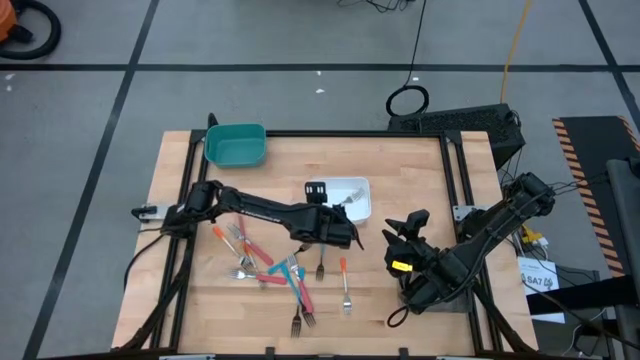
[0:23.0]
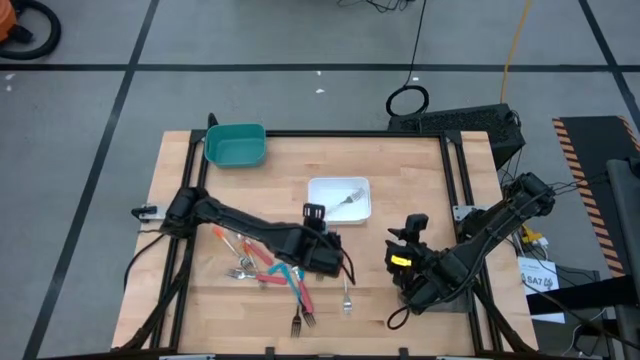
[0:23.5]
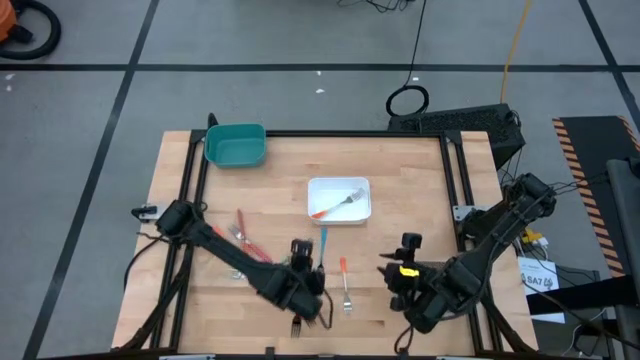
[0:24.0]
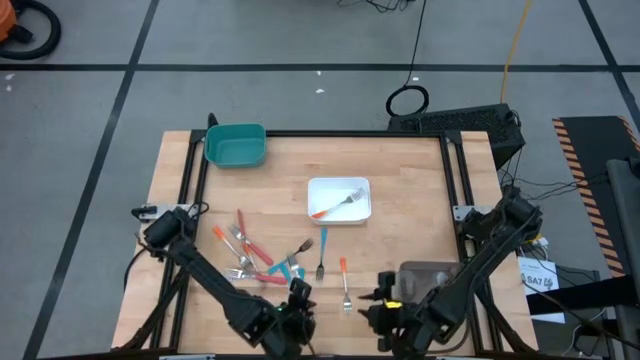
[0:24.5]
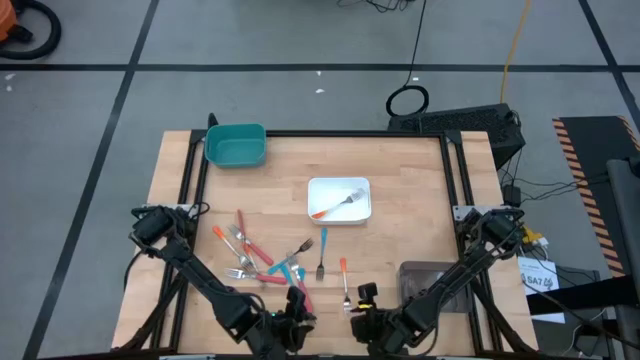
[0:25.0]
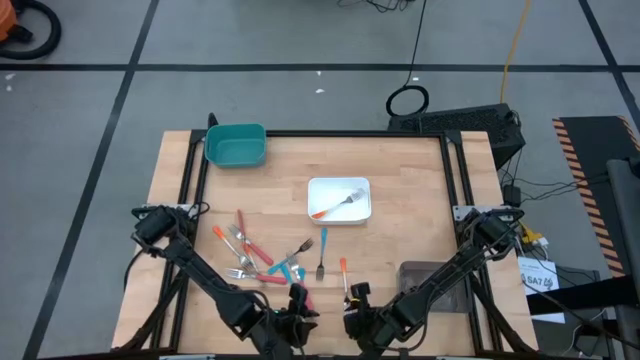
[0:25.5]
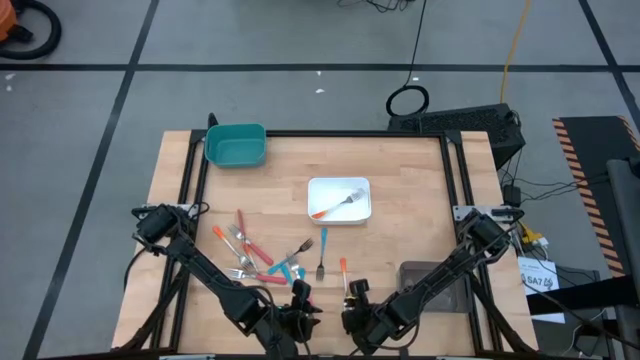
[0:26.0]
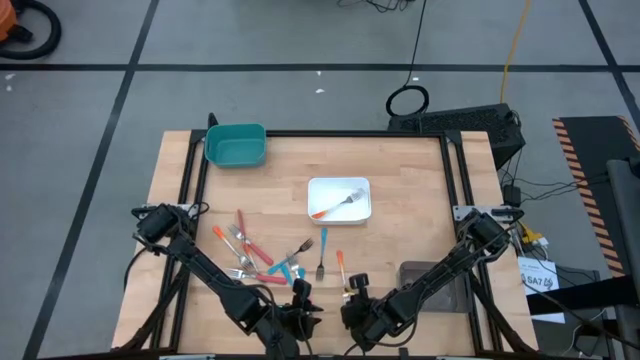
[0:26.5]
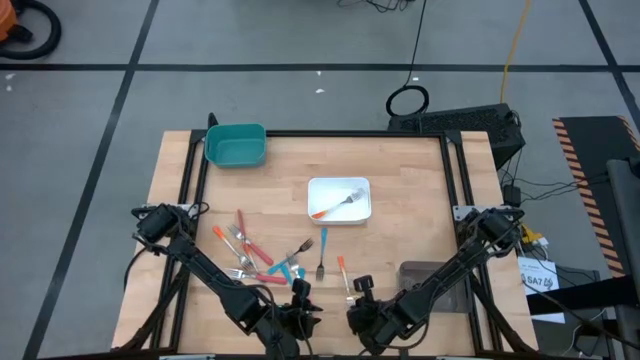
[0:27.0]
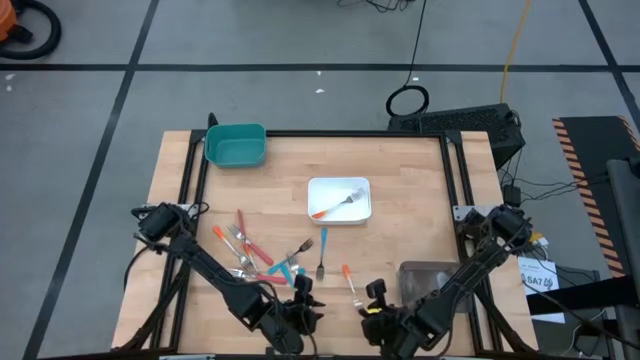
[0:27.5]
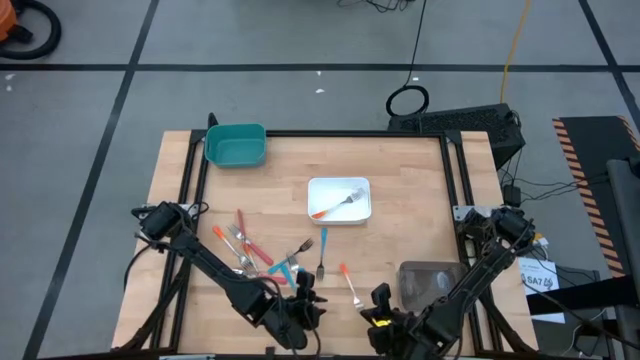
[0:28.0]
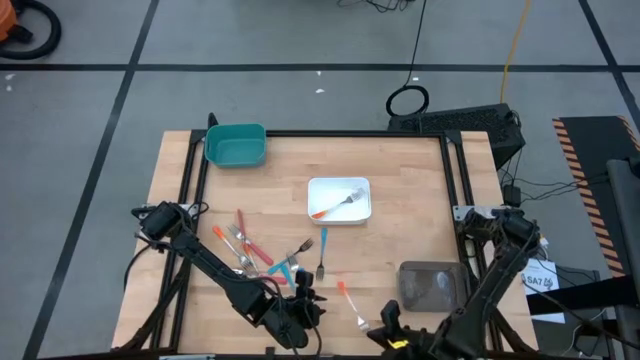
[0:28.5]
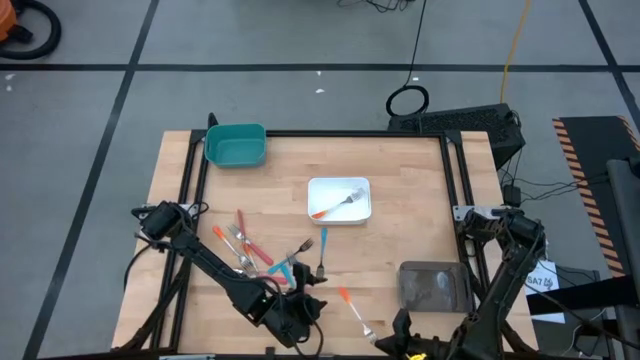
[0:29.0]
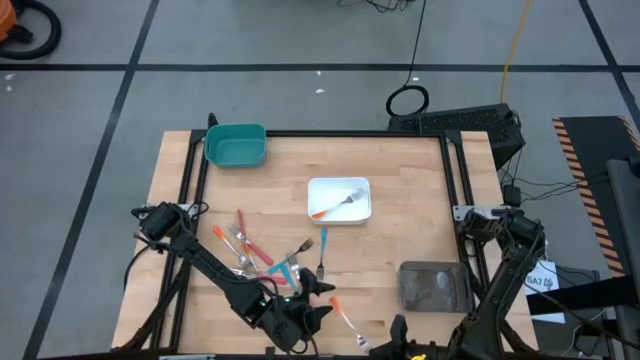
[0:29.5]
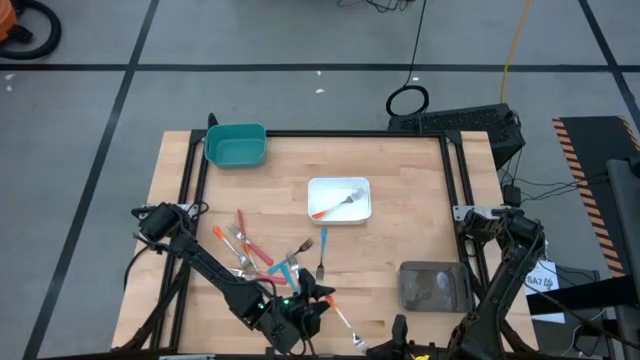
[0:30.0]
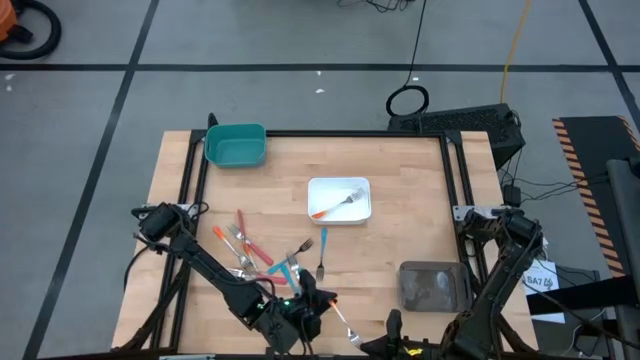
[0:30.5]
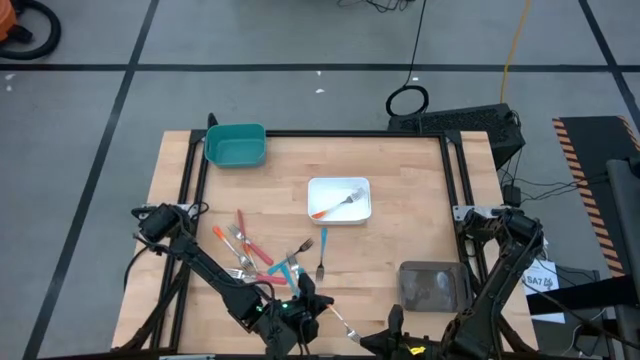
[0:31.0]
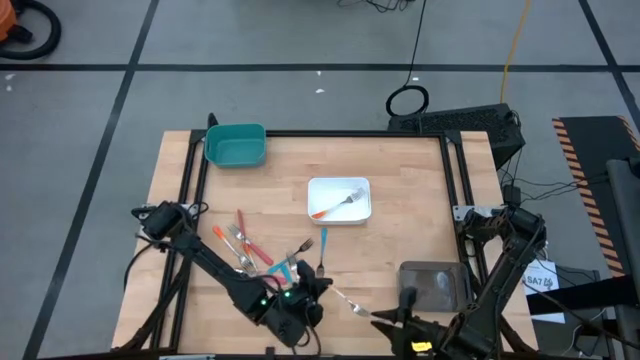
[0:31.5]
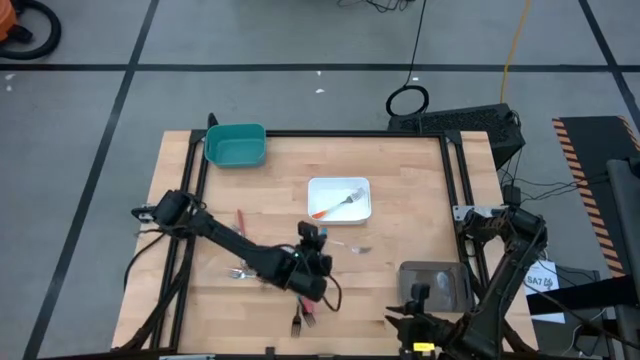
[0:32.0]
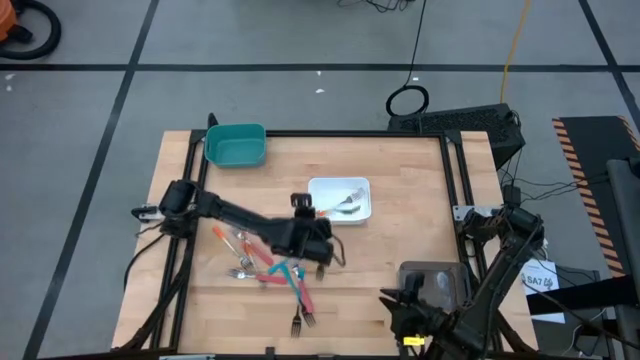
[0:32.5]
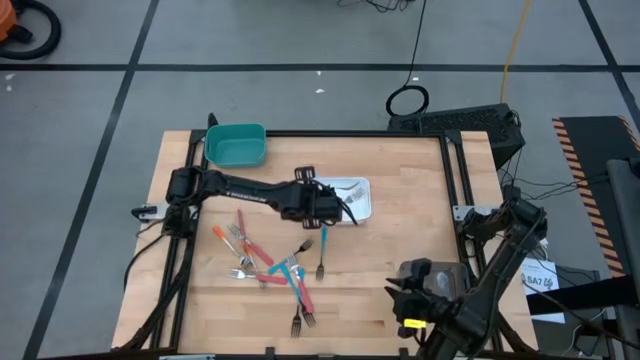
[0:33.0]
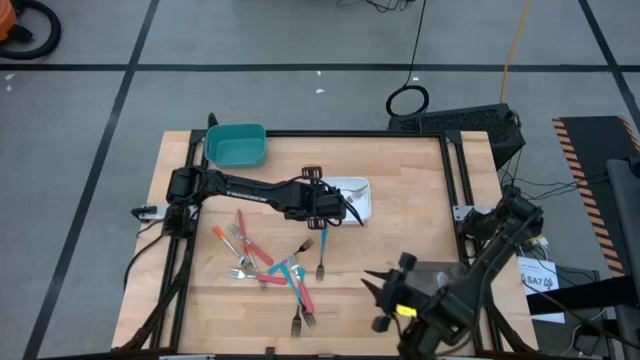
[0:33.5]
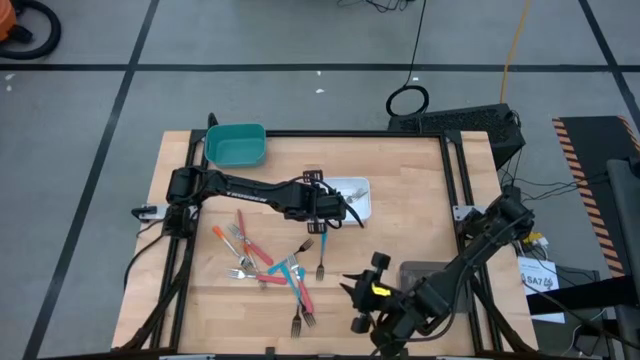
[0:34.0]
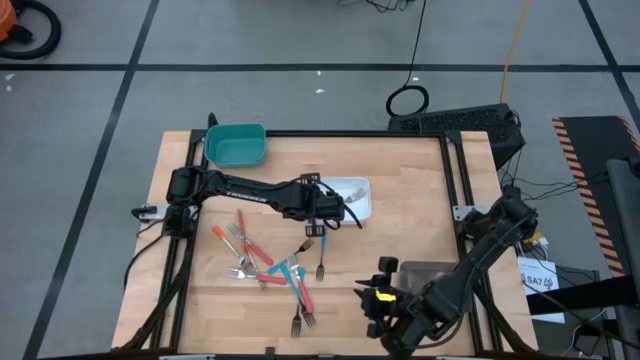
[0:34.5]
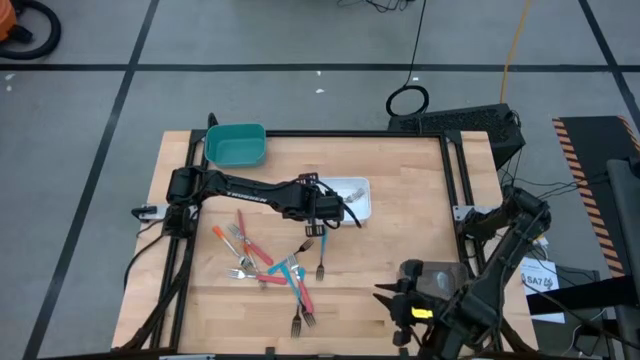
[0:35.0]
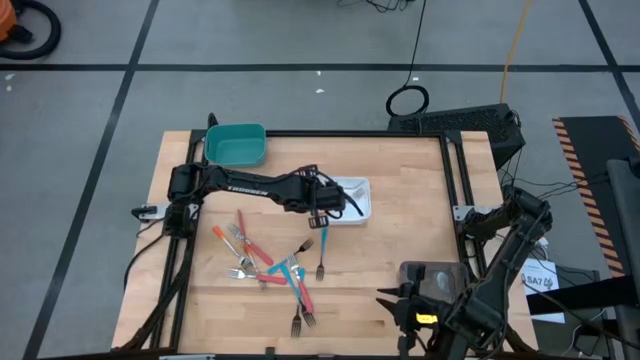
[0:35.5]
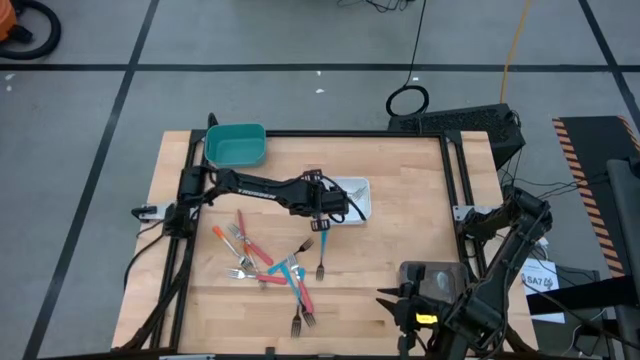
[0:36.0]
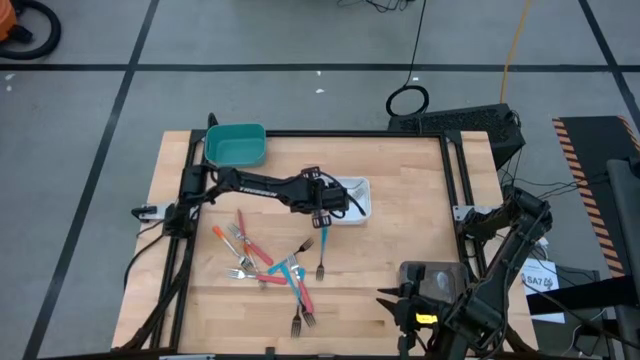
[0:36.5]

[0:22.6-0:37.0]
Task: Sort silverware by color (type)
Put the orange fork into the white bin

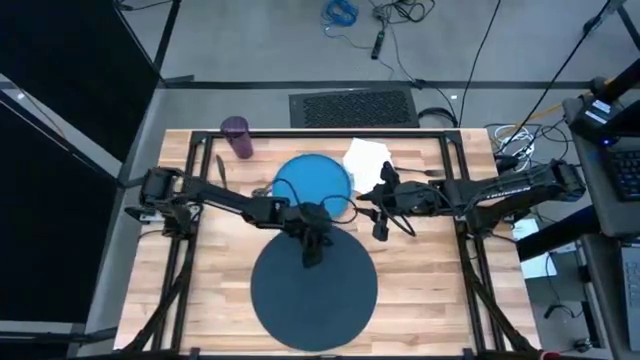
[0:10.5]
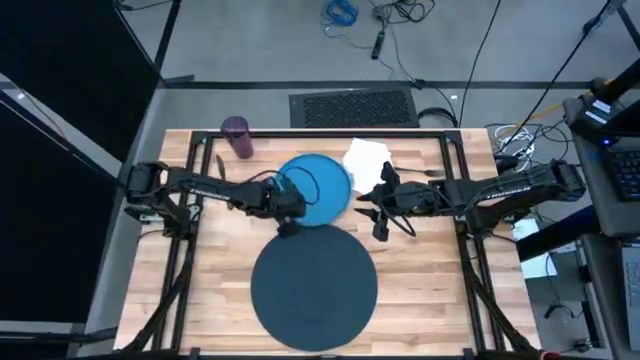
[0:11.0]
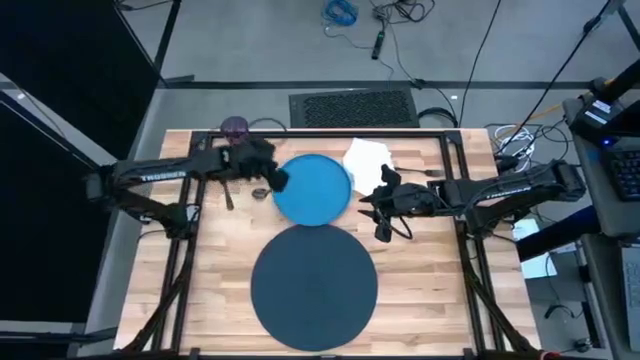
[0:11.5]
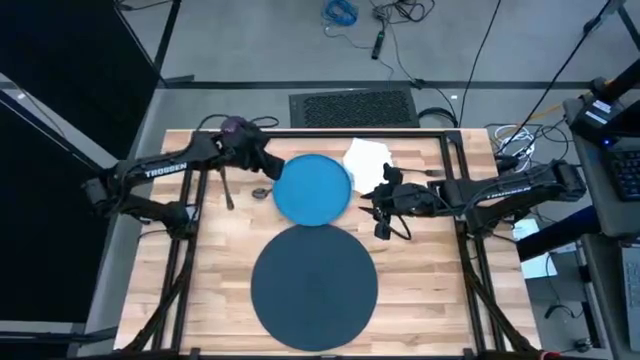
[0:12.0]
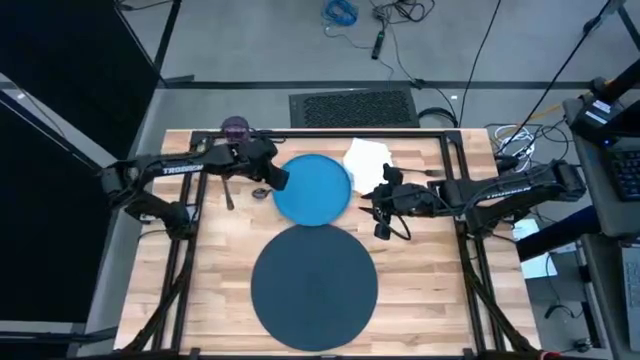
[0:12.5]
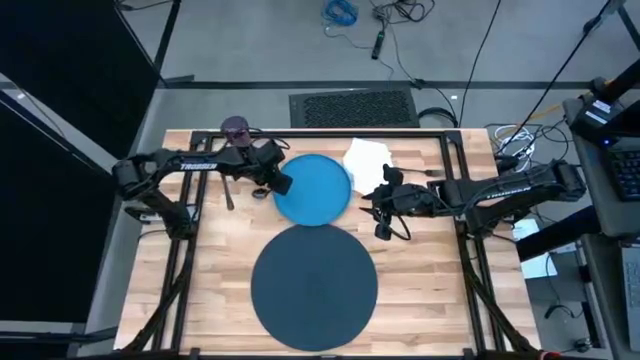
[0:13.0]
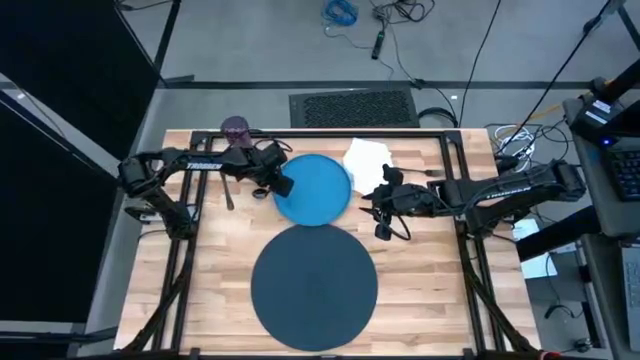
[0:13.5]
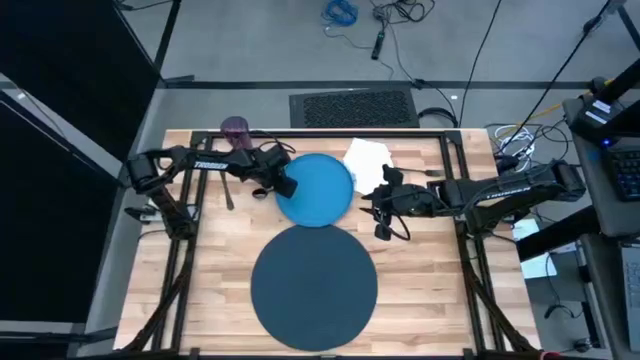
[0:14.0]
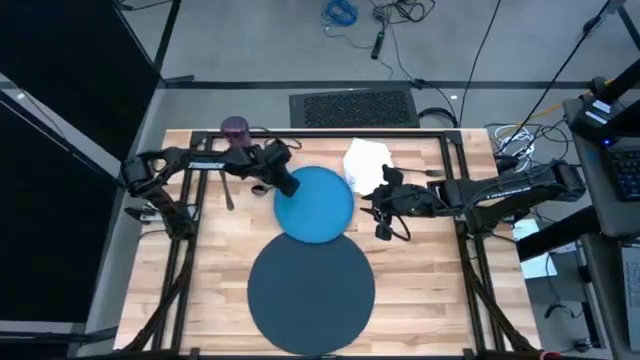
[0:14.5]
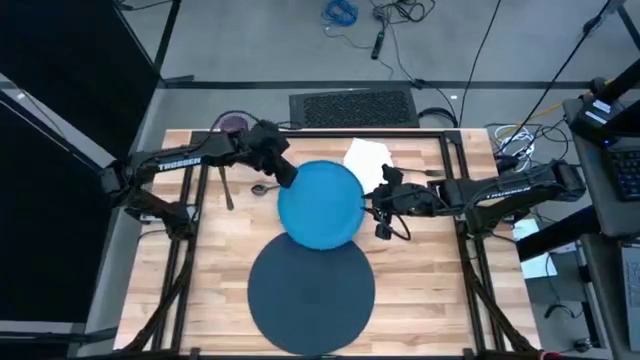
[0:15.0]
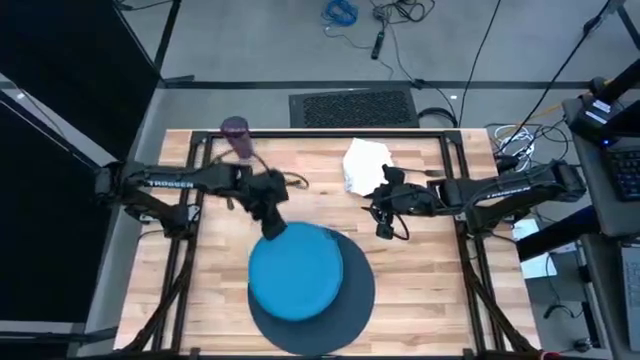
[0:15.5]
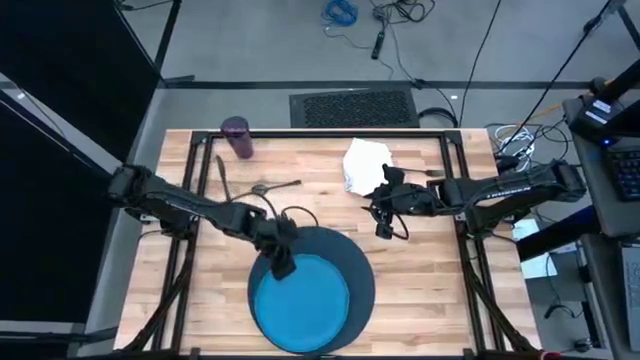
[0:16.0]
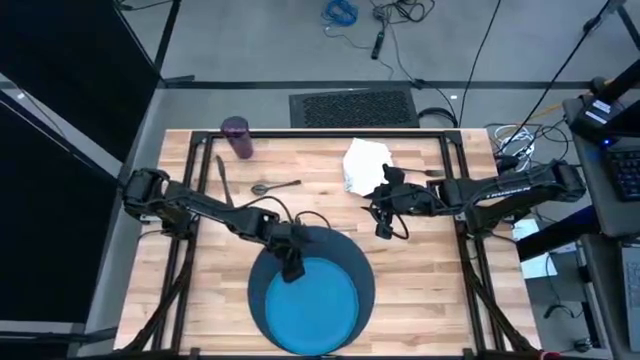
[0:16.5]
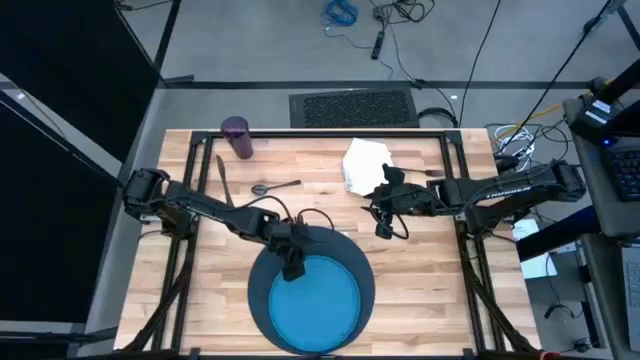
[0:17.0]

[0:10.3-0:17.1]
Task: Set table place
Put the blue plate on the placemat
